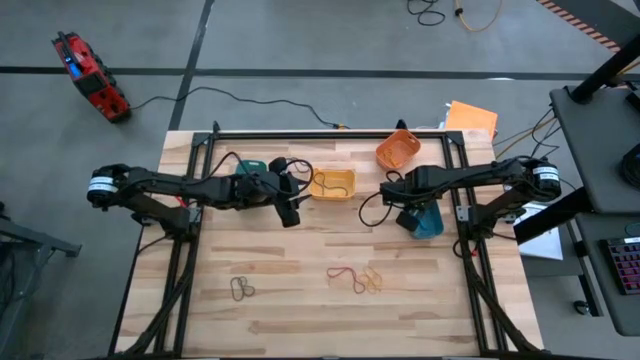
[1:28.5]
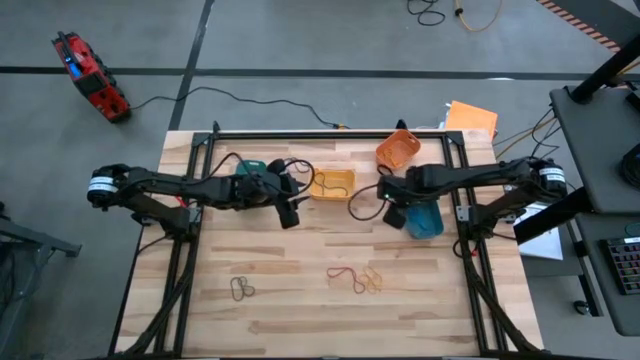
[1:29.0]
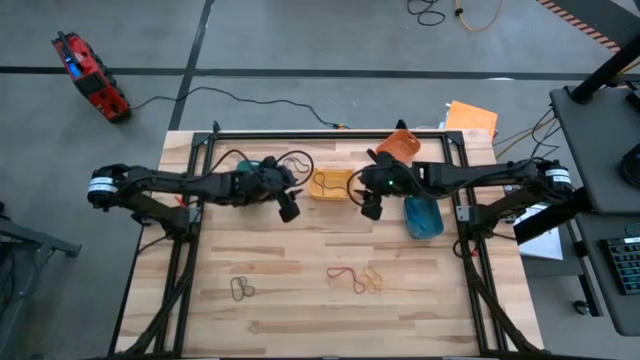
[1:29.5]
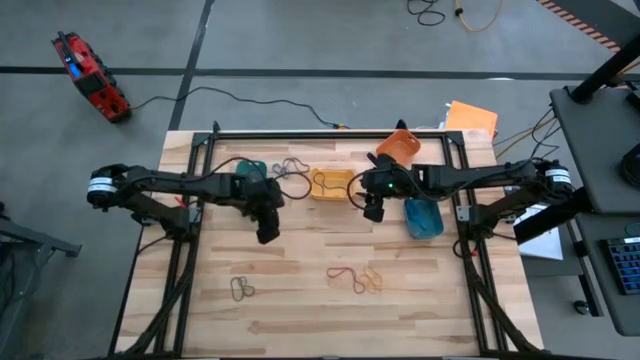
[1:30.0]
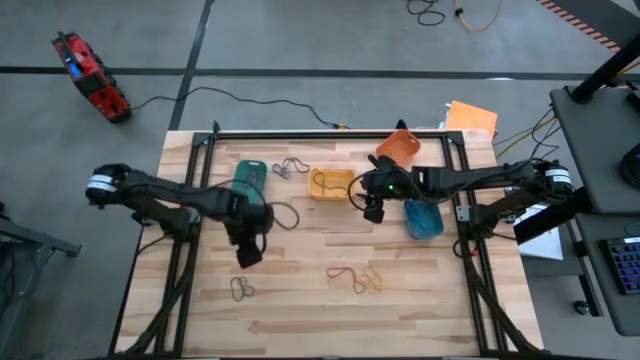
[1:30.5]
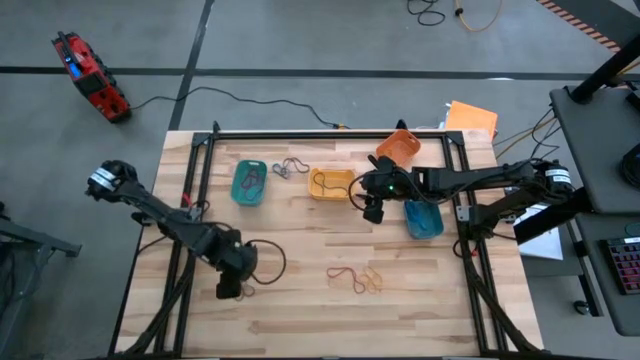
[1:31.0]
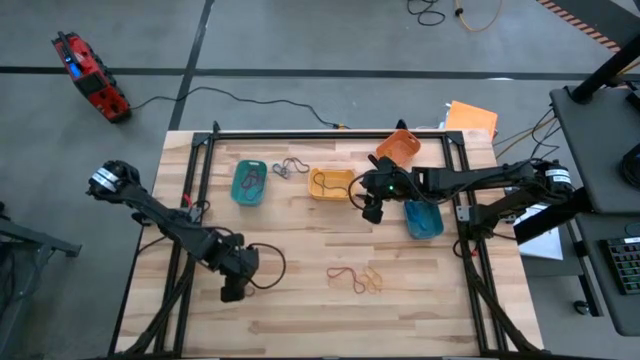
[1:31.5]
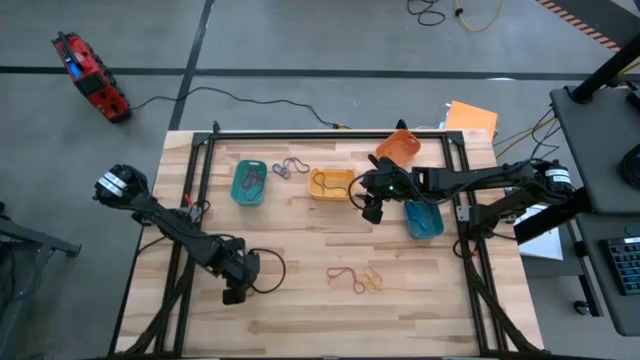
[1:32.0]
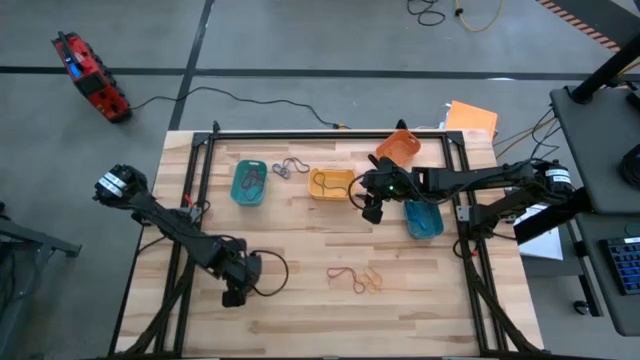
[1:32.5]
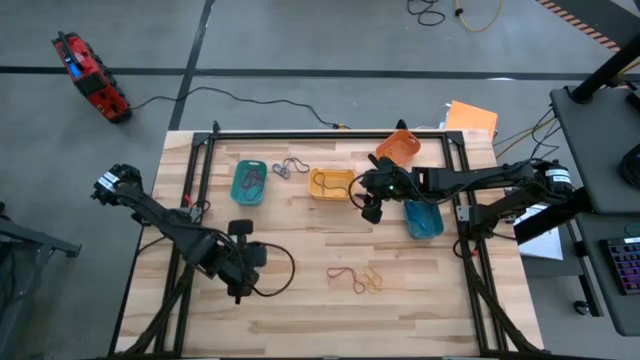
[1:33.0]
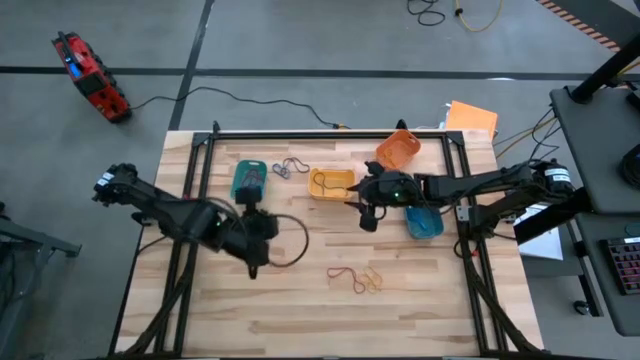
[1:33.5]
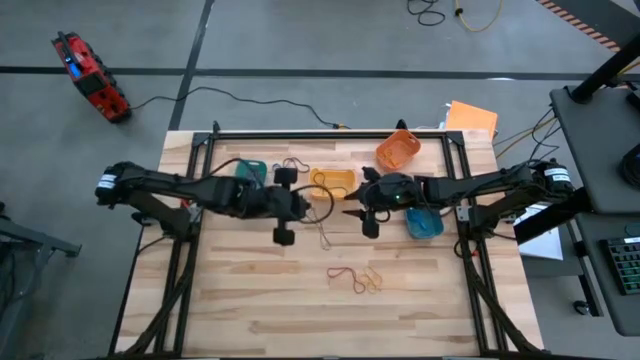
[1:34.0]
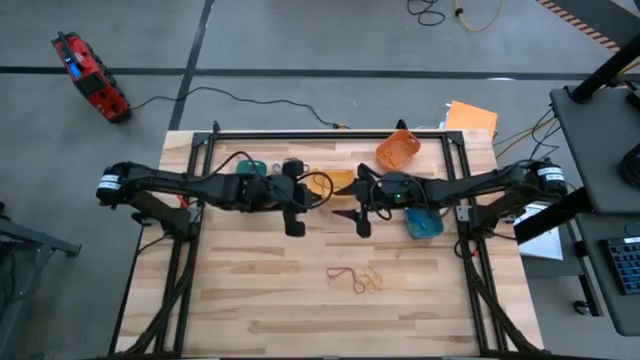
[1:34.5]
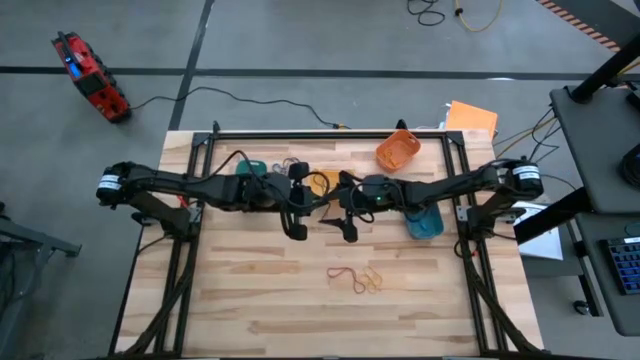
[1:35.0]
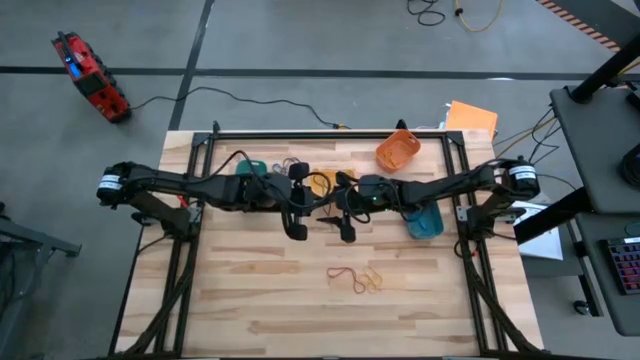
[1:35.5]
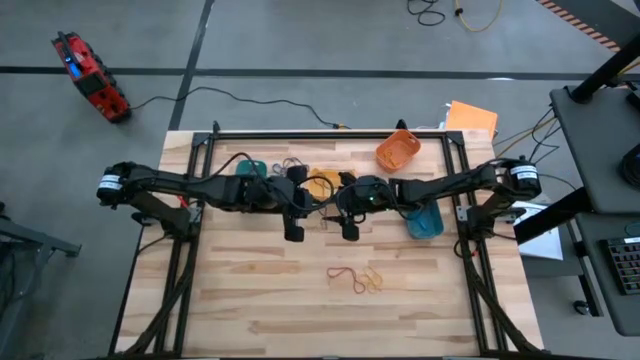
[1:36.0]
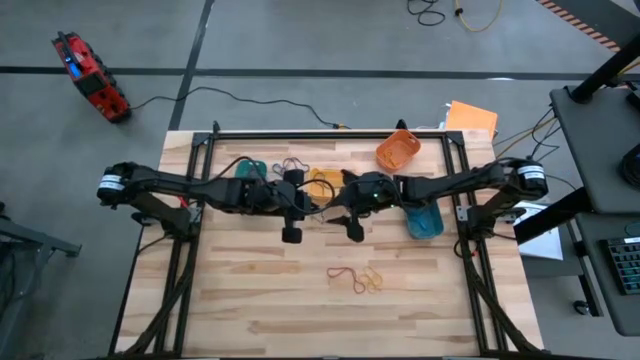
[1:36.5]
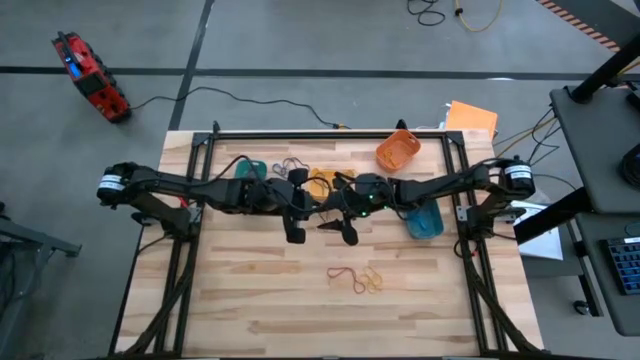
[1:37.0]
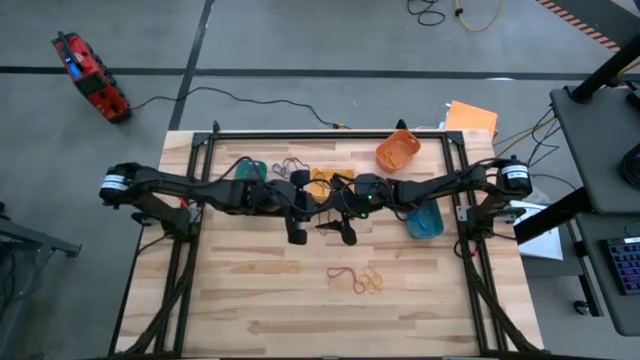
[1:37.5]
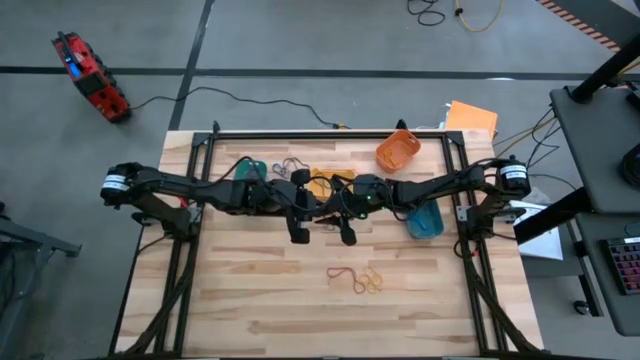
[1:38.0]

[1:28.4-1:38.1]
Task: Sort rubber bands into baskets
Put the black rubberband into the yellow bin

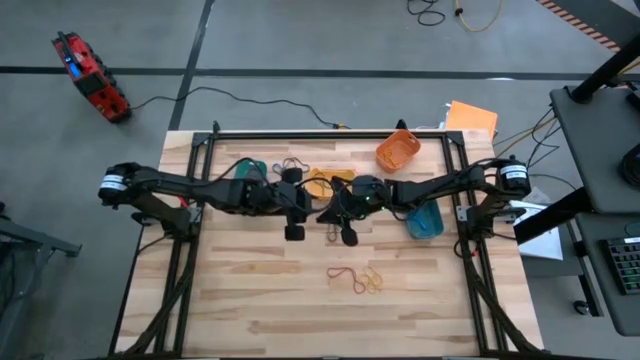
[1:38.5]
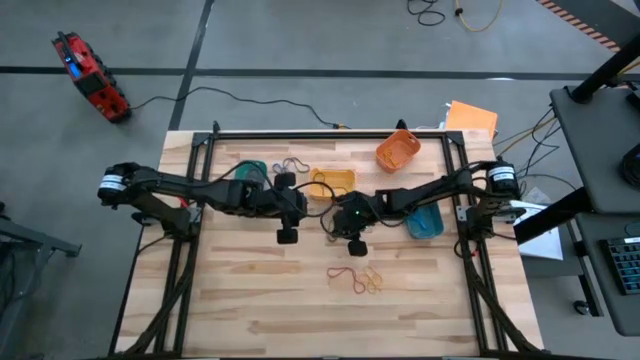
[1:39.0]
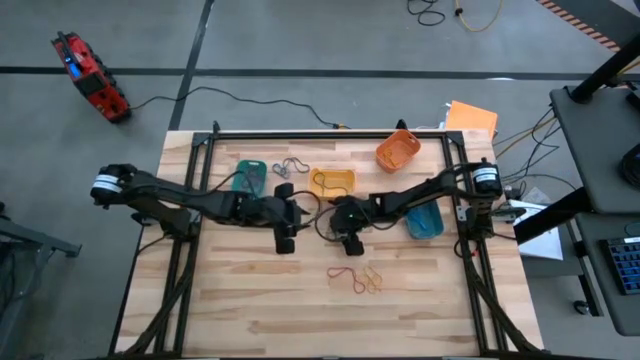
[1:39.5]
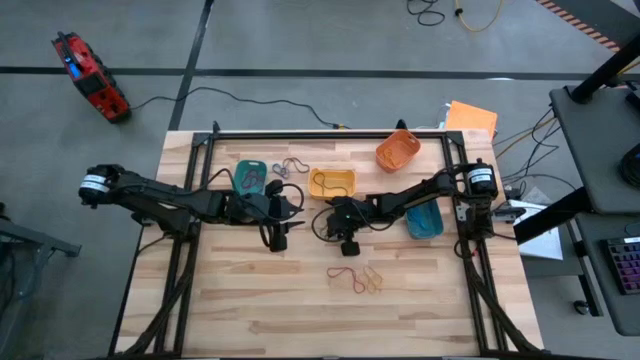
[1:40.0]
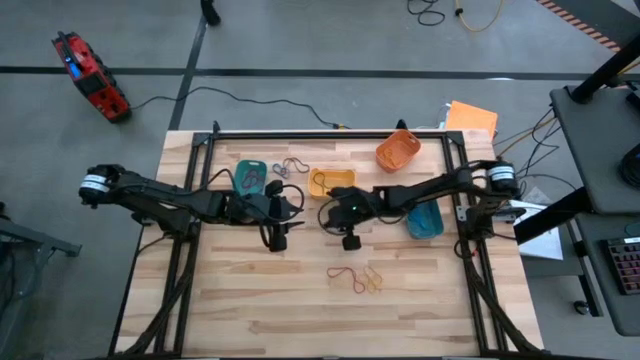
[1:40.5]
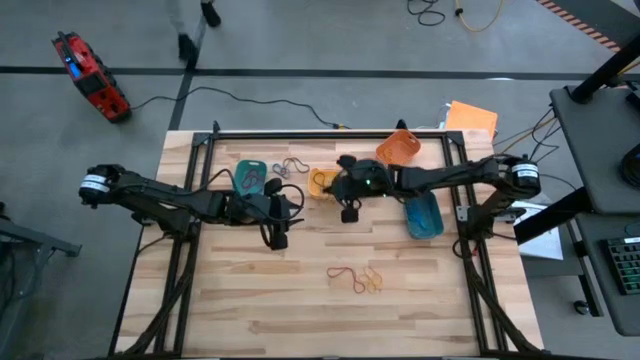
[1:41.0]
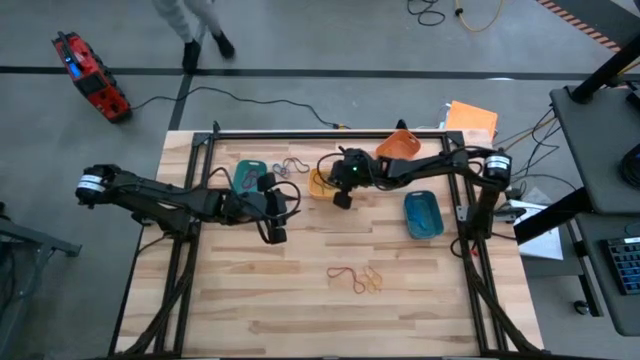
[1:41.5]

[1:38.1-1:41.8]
Put the black rubberband into the yellow bin

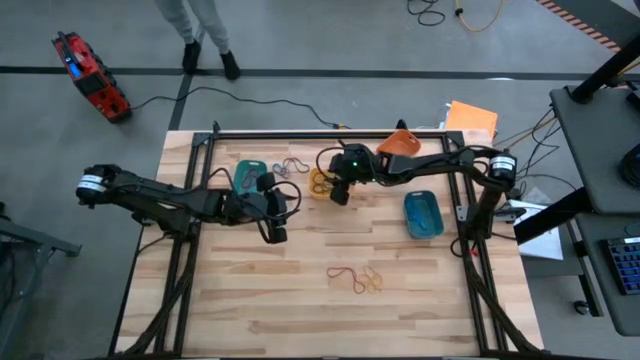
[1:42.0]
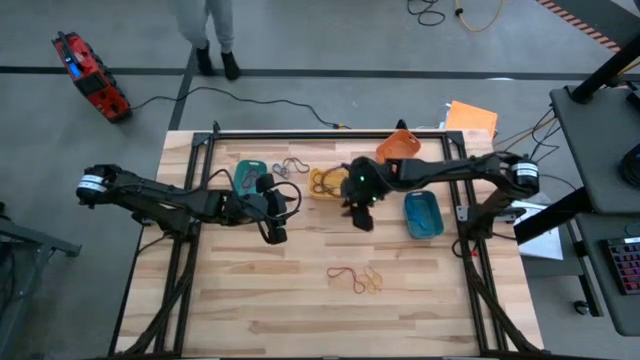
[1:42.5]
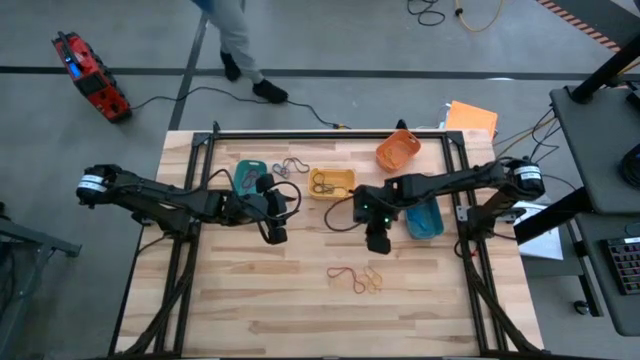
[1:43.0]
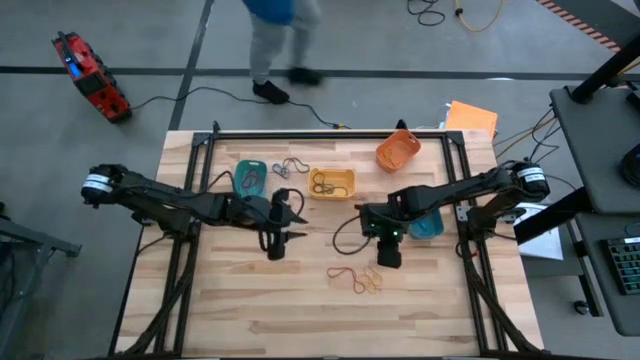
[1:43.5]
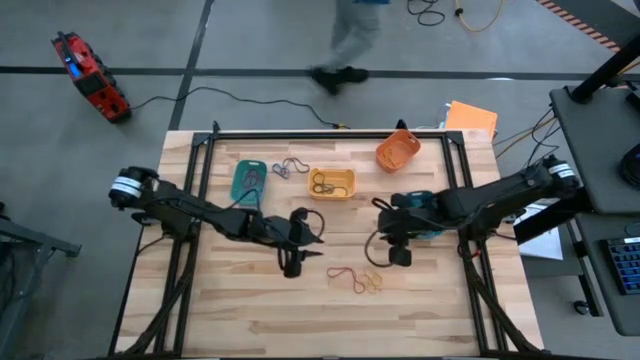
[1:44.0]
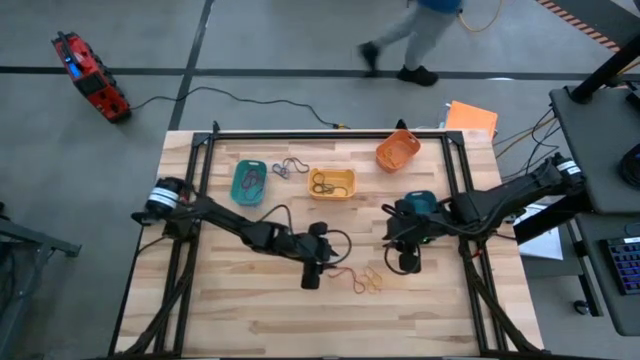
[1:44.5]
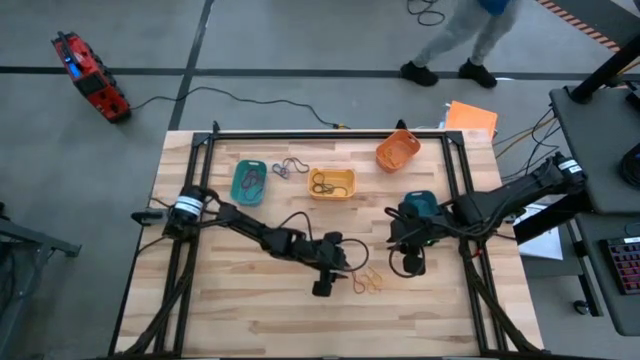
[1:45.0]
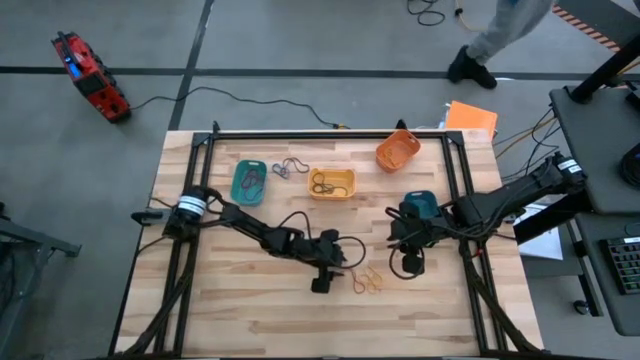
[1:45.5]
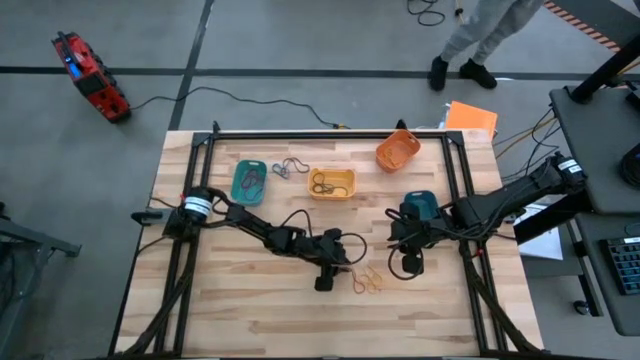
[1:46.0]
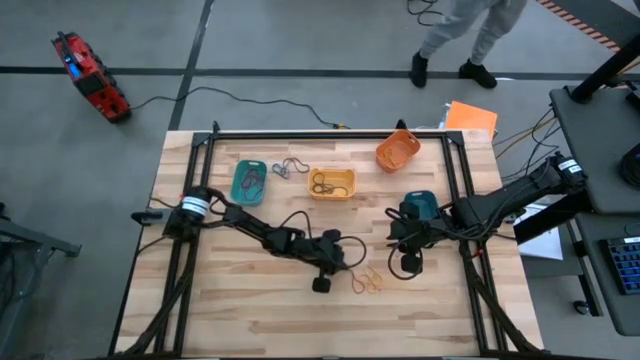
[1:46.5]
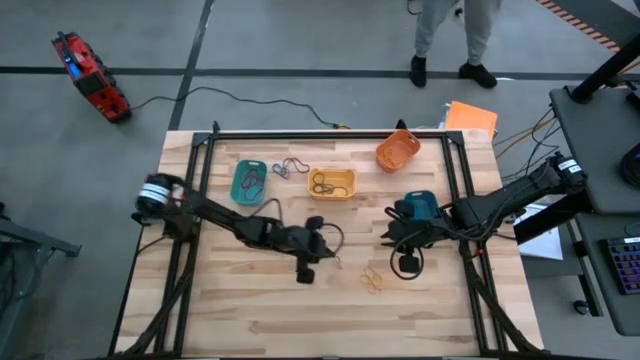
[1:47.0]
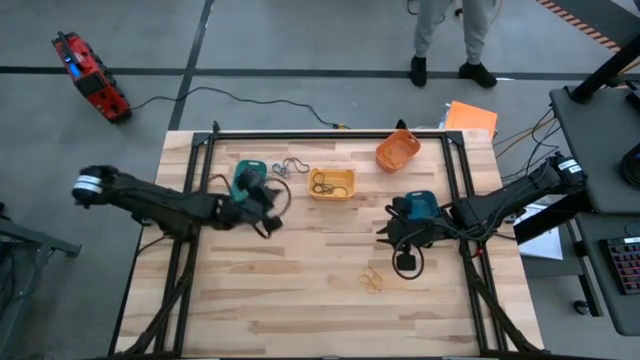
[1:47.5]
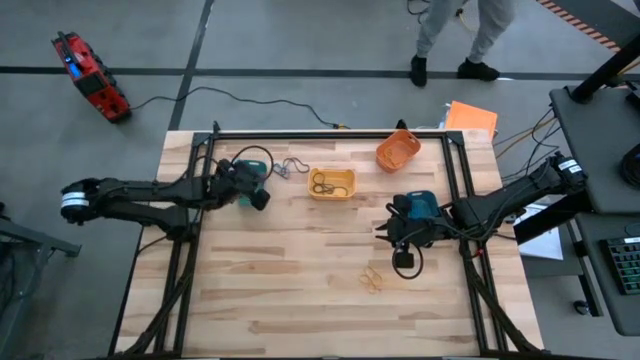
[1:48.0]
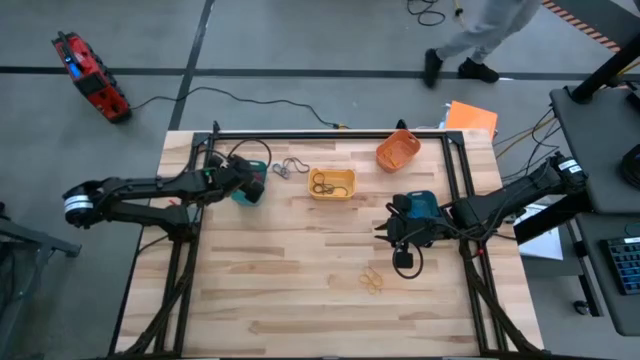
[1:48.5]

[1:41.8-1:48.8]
Put the red rubberband into the green bin

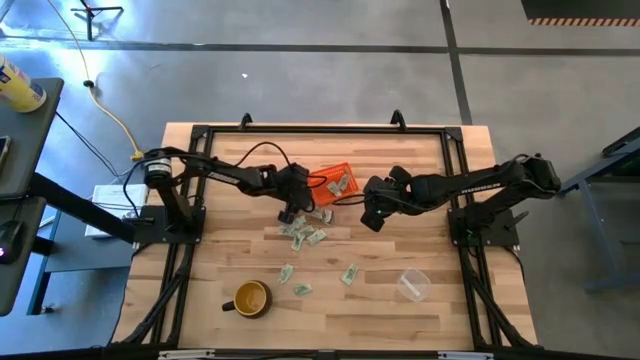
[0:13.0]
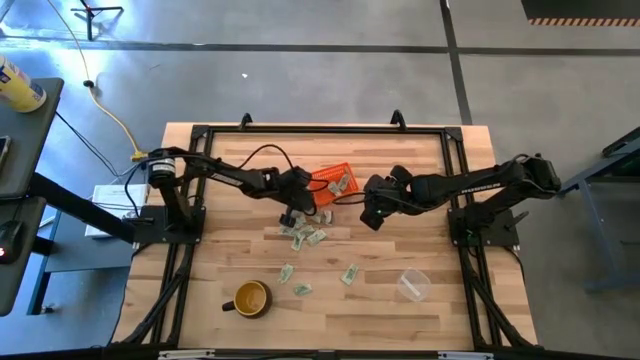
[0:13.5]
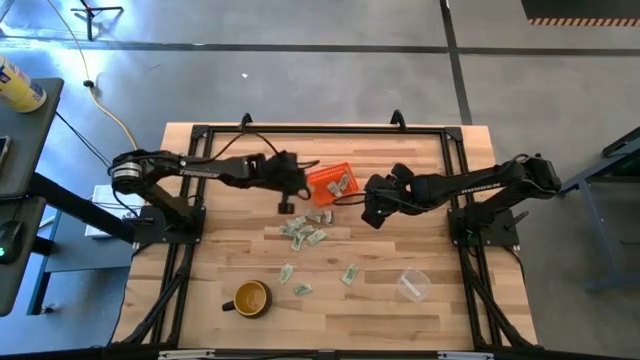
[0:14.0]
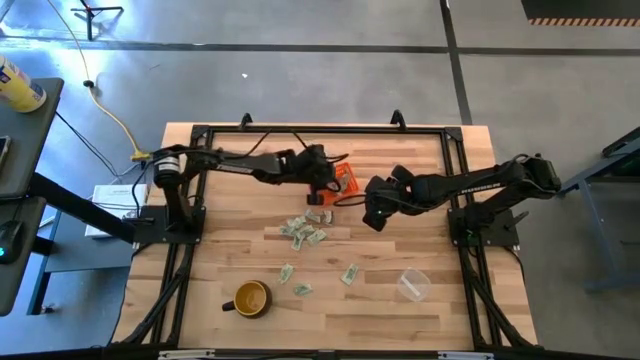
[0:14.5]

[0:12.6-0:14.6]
Task: Pick and place items into bin
Put the white stevia packet into the orange bin
